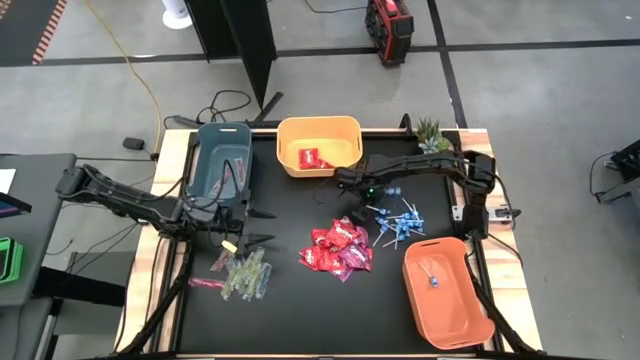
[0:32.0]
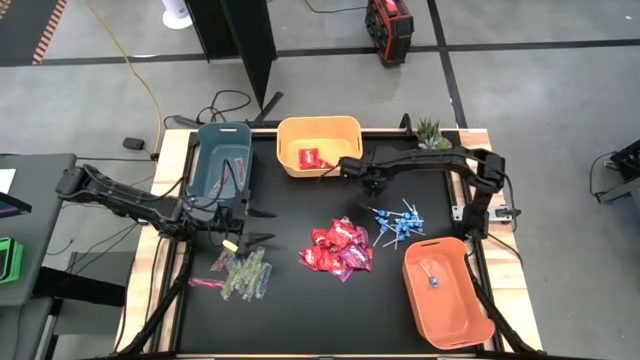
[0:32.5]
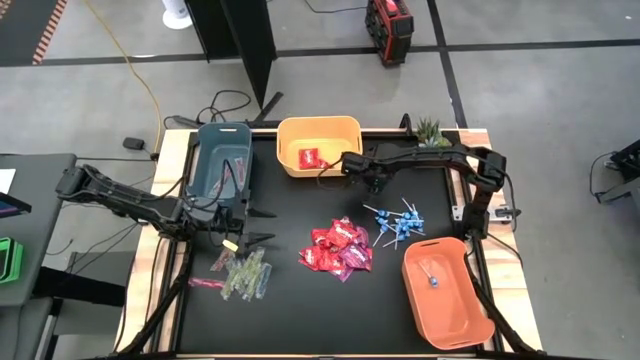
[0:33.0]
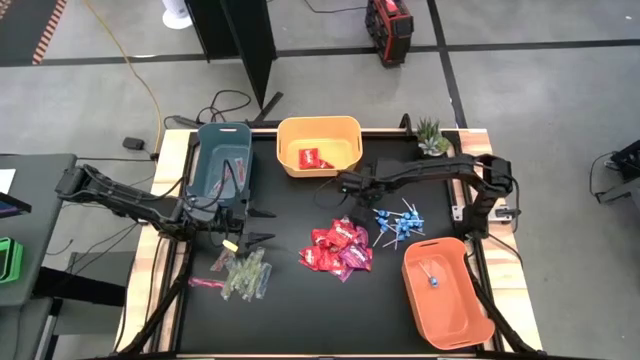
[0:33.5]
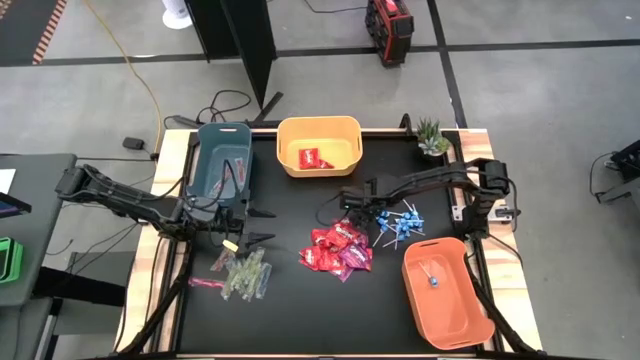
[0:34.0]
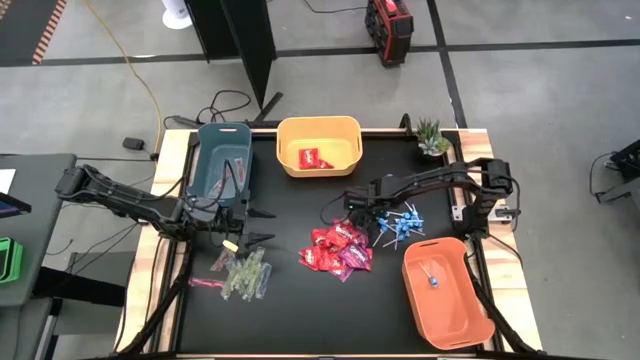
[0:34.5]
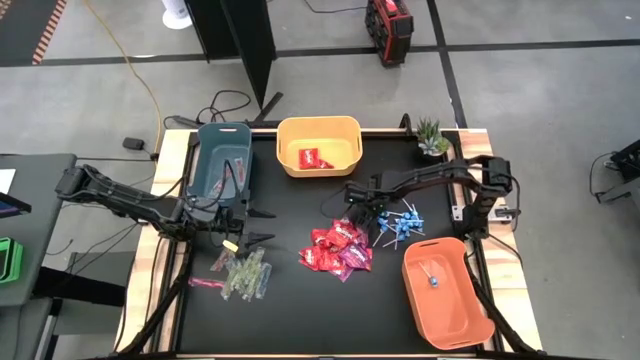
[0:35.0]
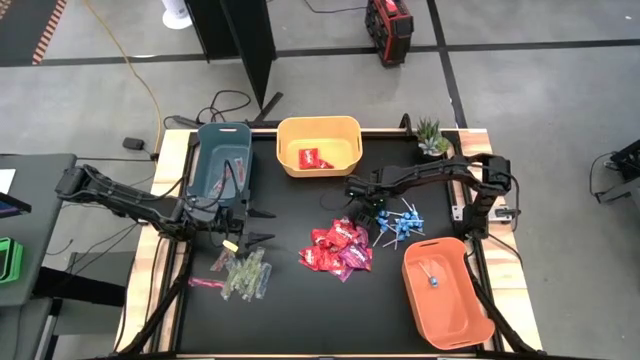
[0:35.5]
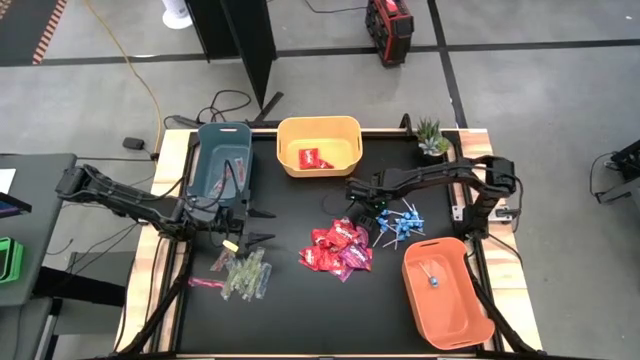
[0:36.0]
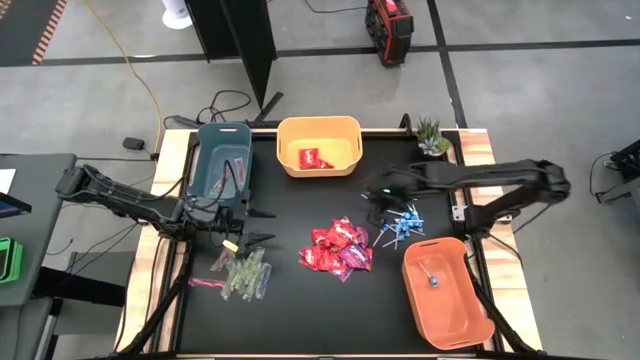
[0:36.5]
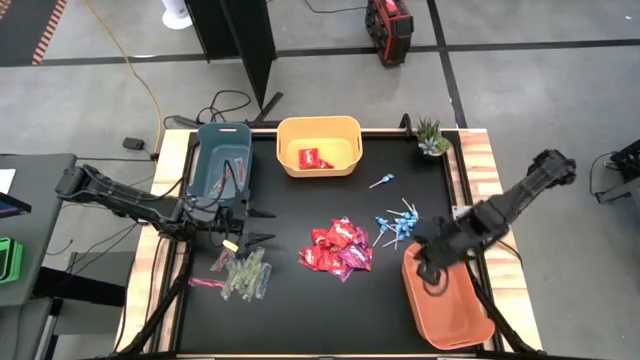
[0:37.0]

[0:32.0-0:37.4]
Task: Sort candy
Put the blue lollipop into the orange bin

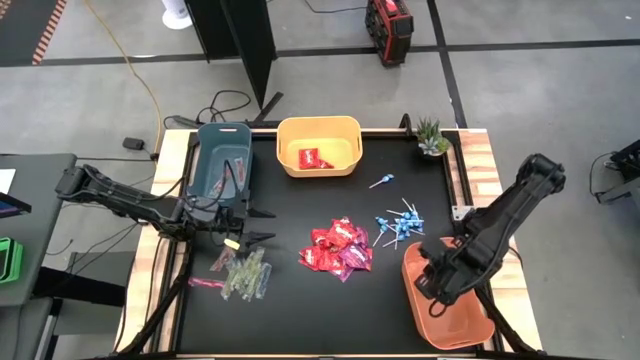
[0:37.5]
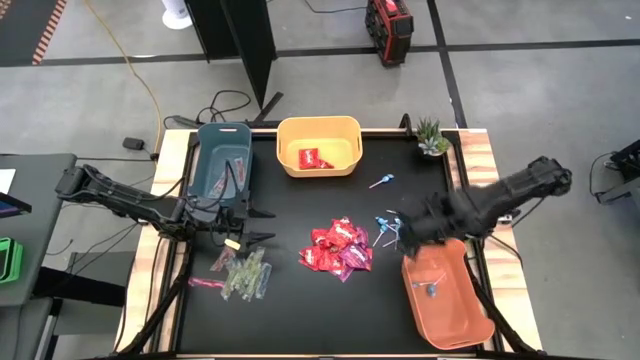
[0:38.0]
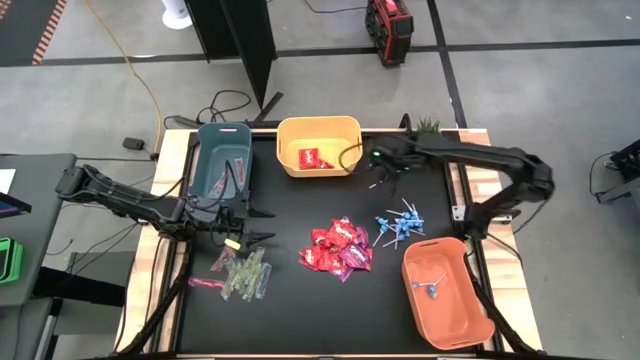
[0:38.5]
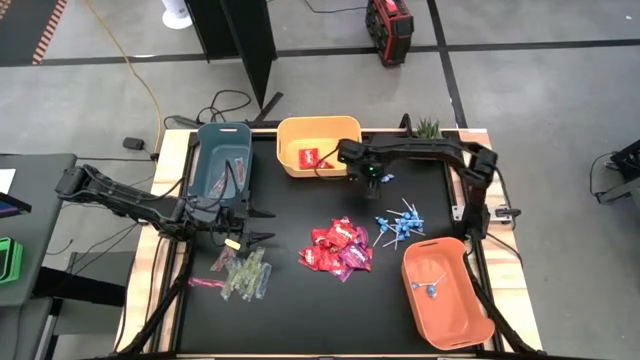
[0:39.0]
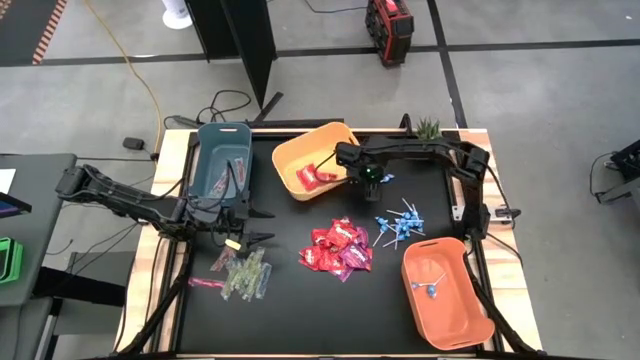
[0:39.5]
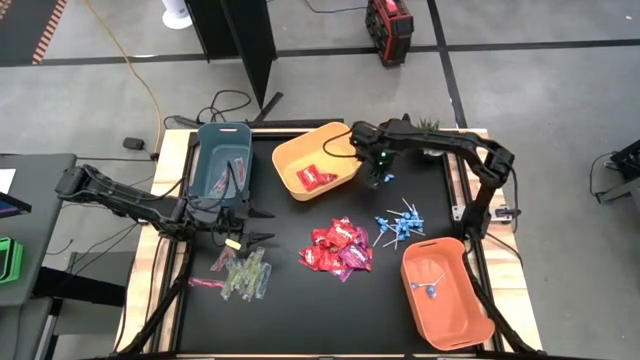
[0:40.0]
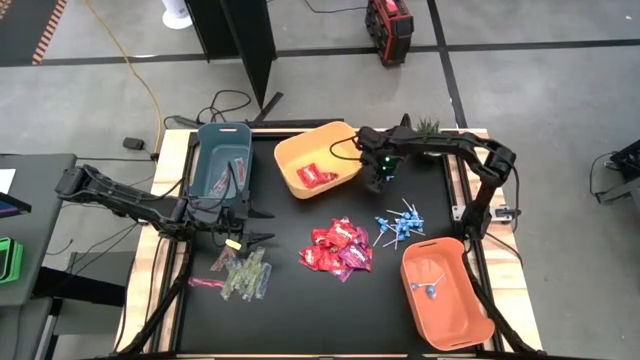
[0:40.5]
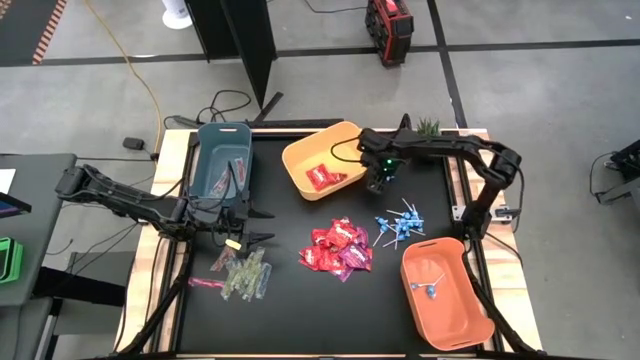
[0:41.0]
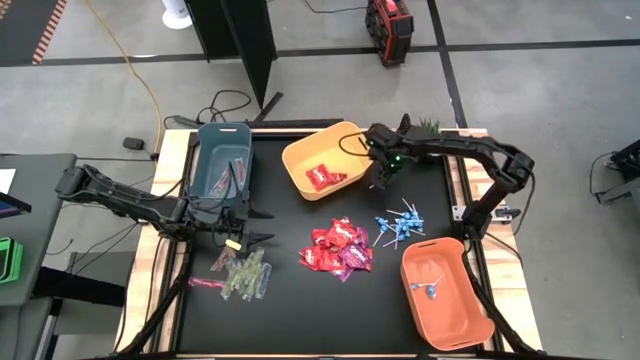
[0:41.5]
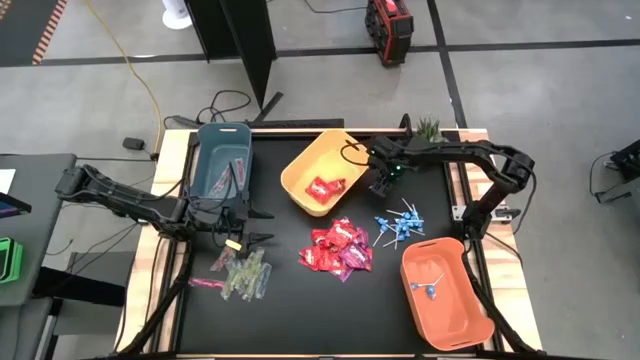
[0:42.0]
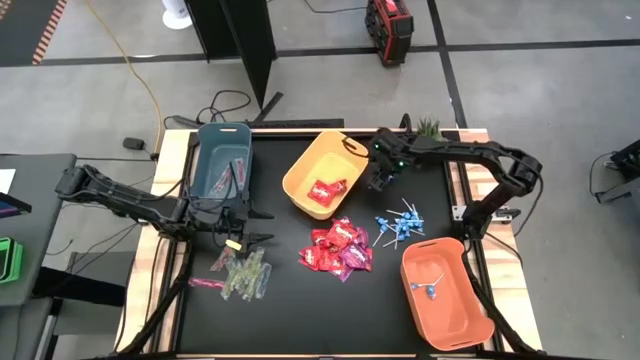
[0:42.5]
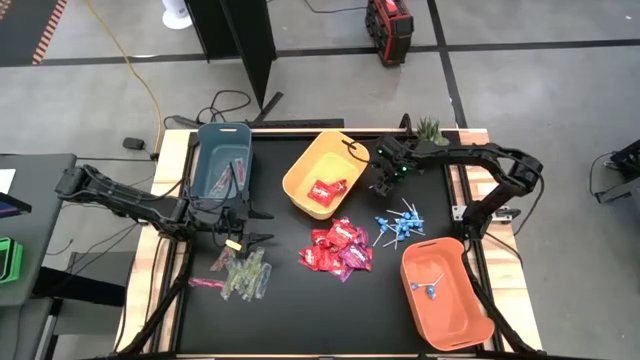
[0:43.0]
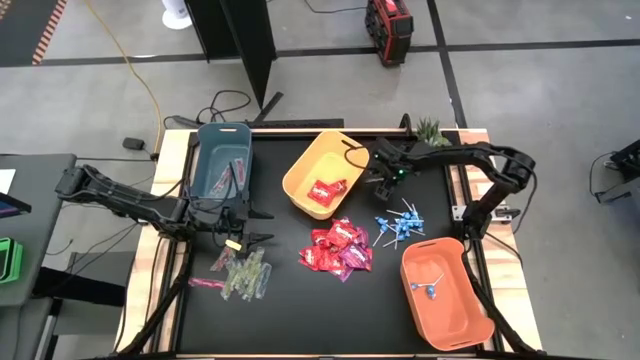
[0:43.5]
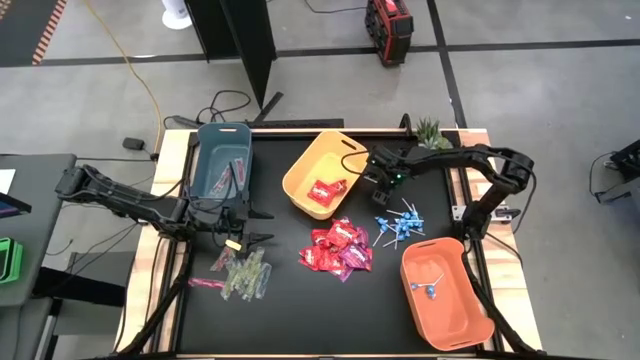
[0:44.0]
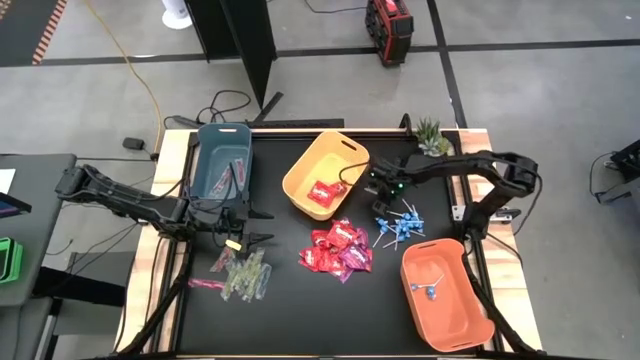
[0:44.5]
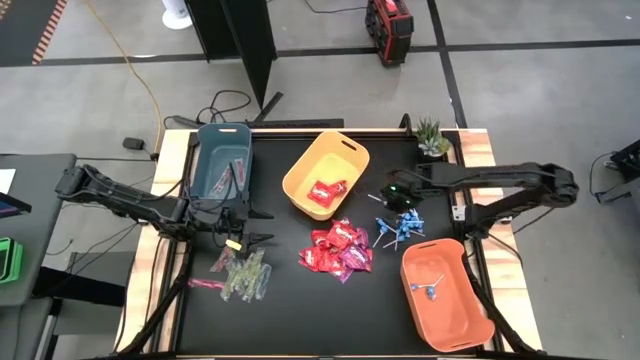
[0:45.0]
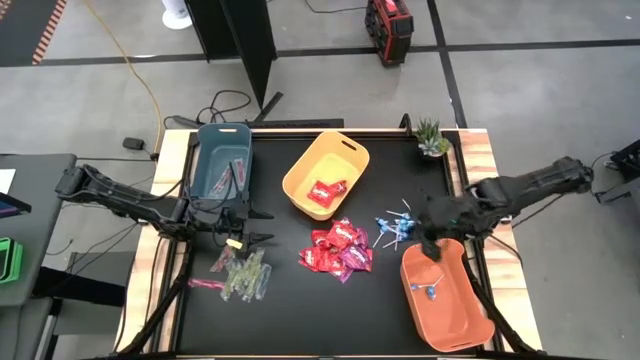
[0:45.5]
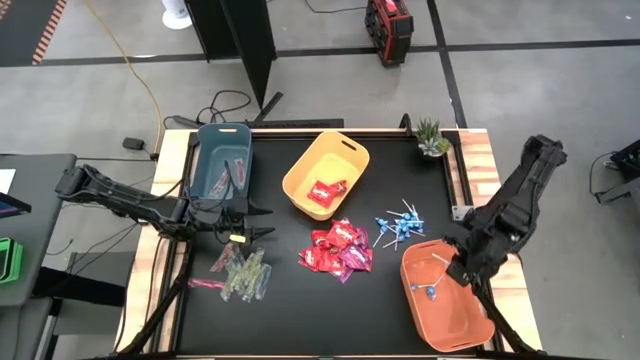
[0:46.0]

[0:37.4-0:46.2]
Put the blue lollipop into the orange bin

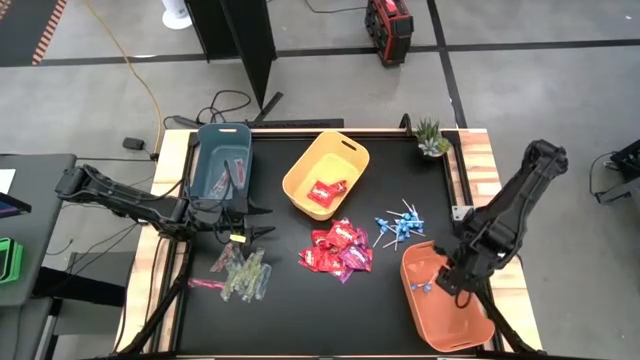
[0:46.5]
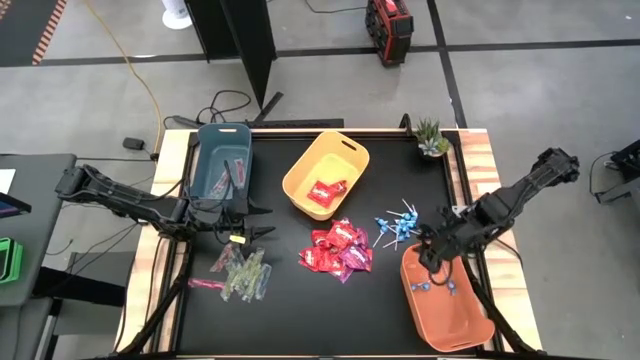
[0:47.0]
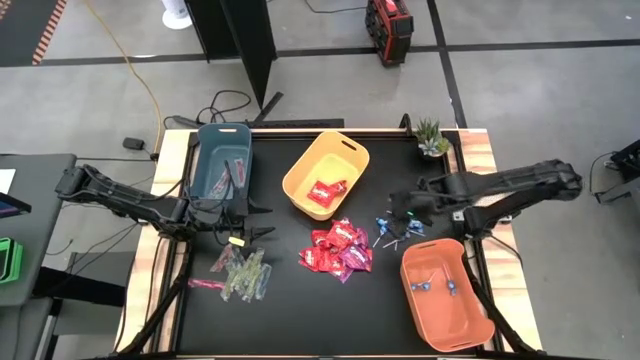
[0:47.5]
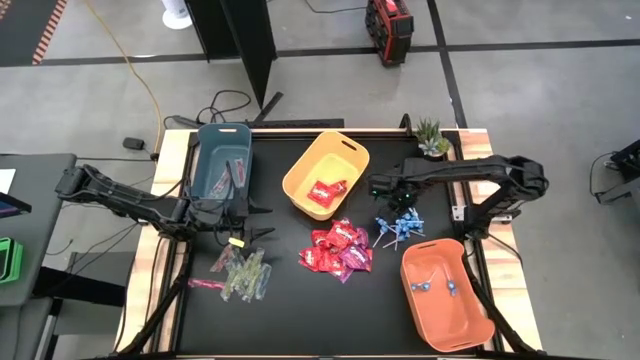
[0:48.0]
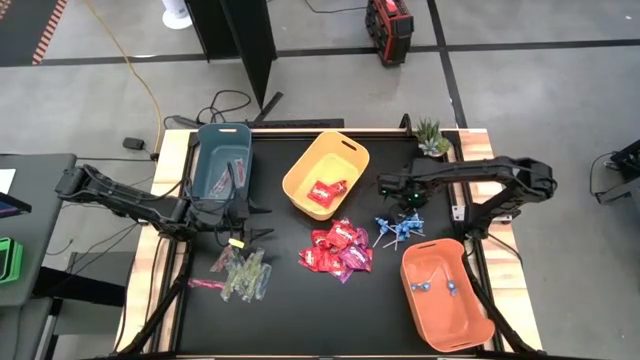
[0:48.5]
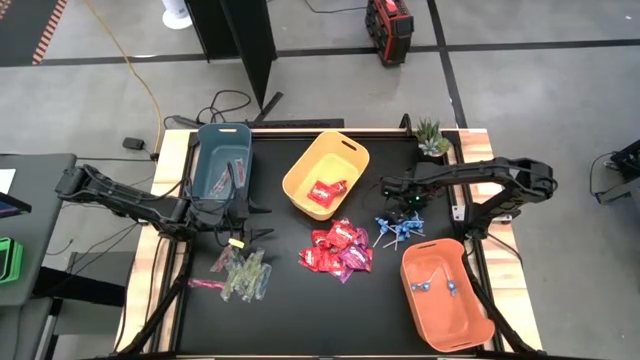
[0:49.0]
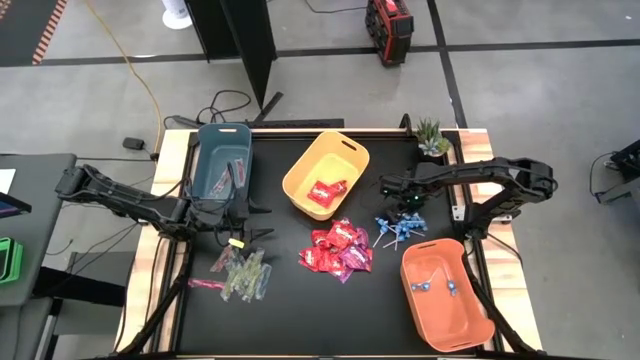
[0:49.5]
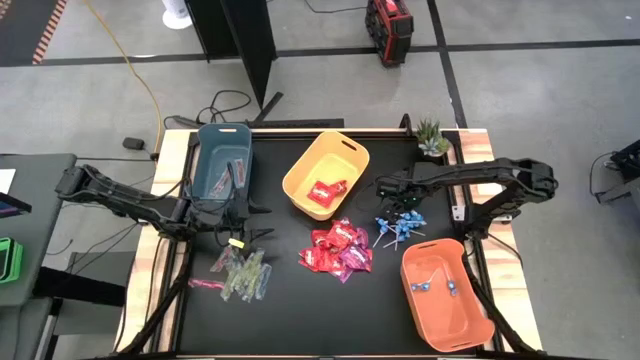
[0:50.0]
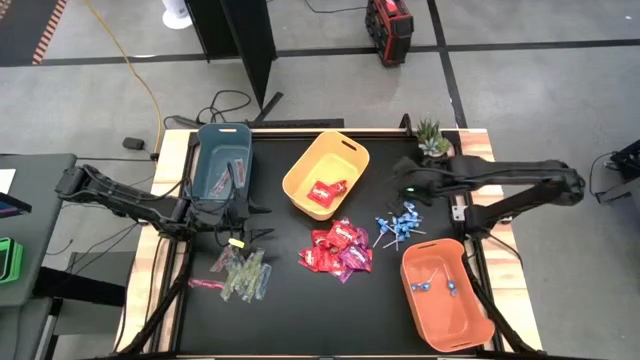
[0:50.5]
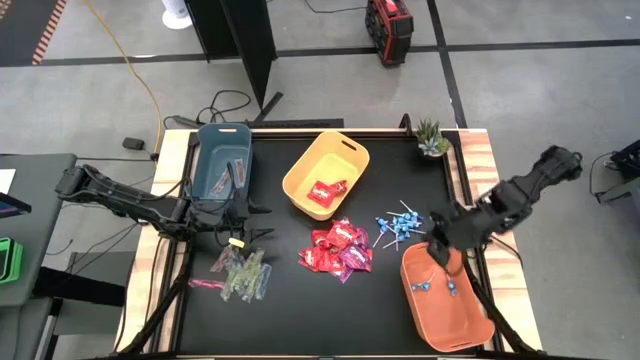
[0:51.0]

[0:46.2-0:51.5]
Put the blue lollipop into the orange bin

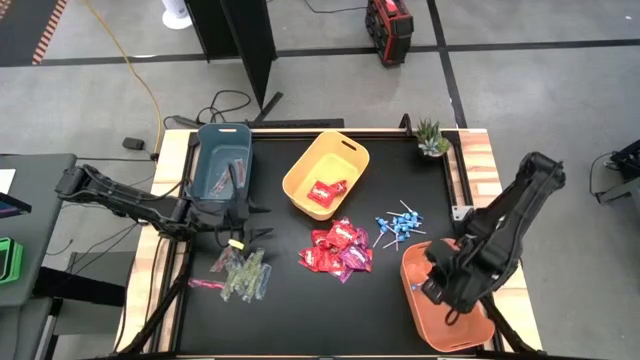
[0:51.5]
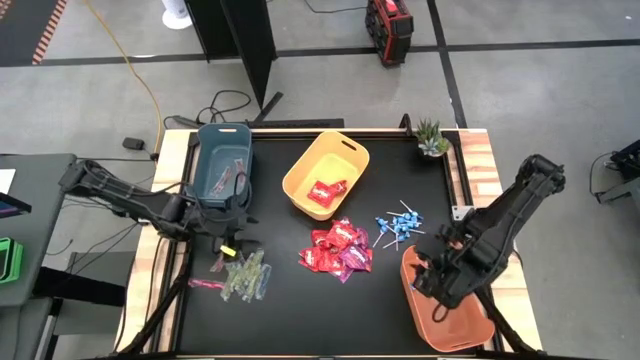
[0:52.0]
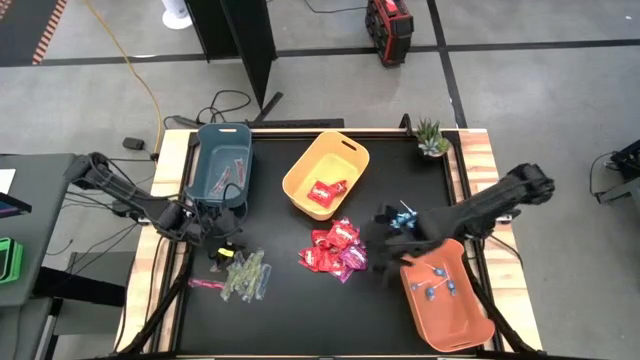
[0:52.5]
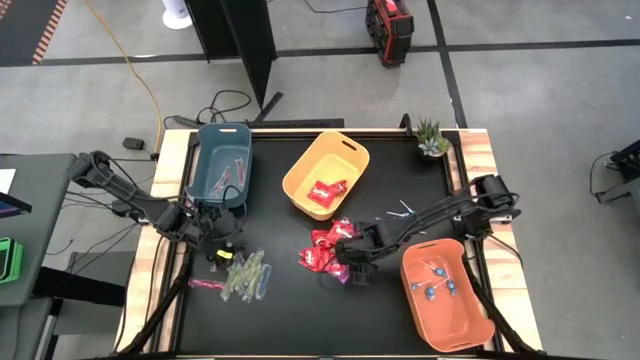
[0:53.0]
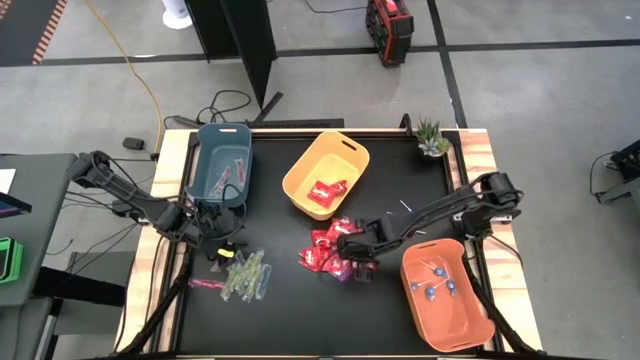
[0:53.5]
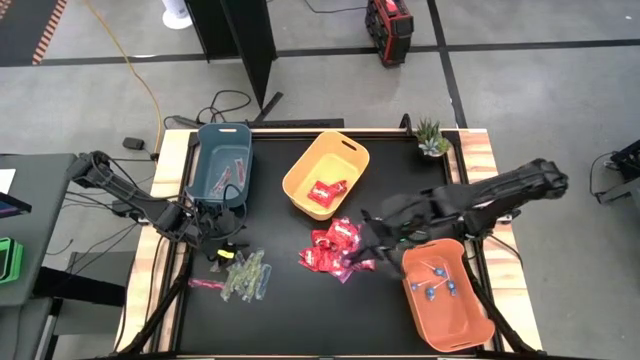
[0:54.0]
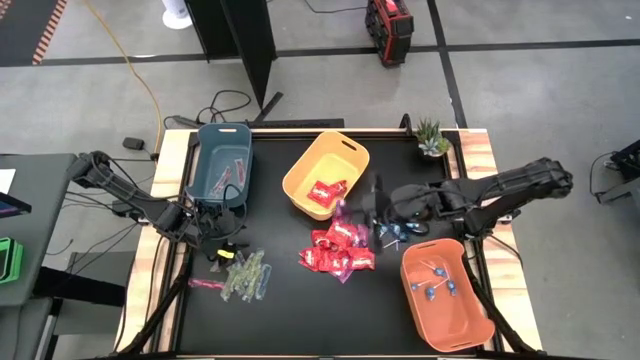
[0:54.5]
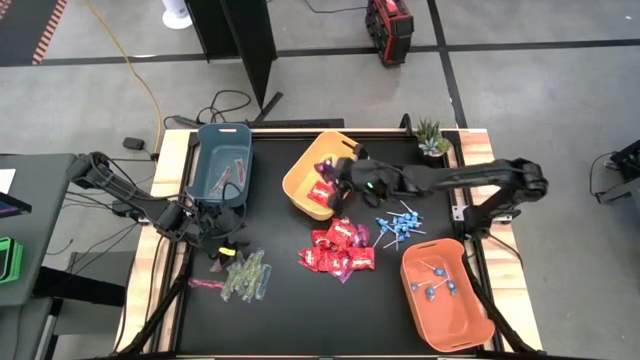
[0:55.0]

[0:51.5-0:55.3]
Put the purple candy into the yellow bin
